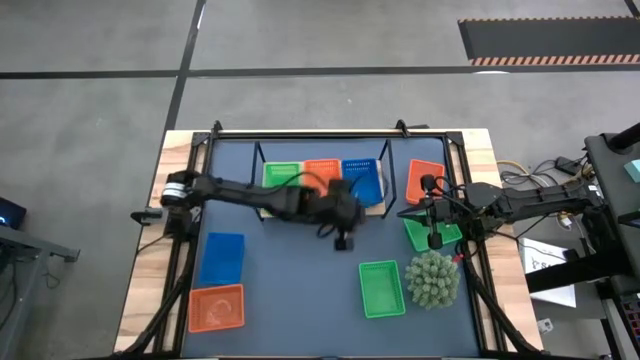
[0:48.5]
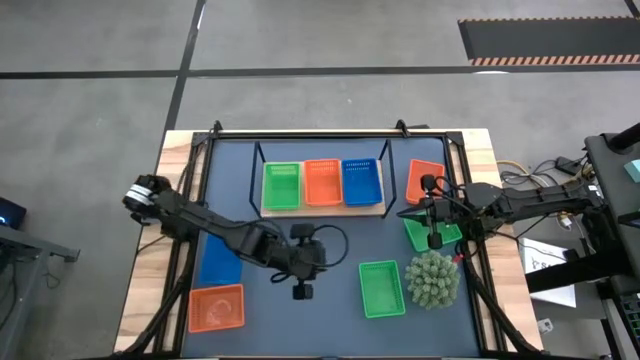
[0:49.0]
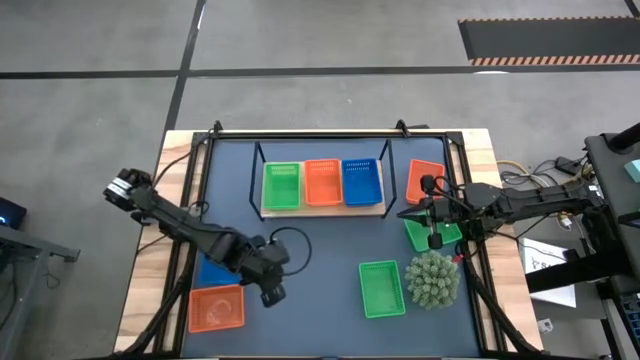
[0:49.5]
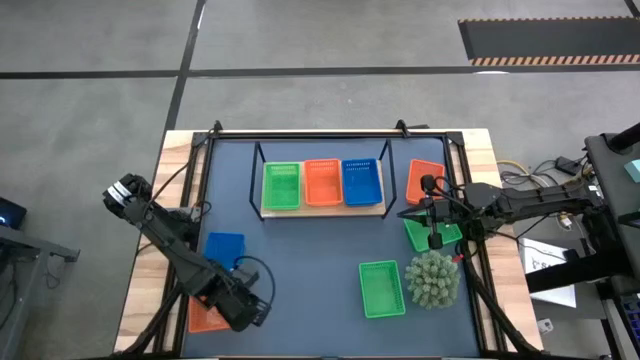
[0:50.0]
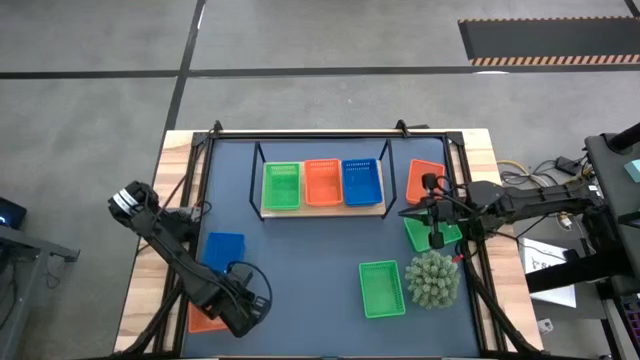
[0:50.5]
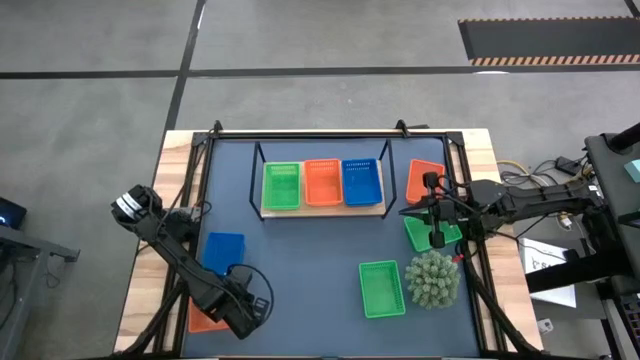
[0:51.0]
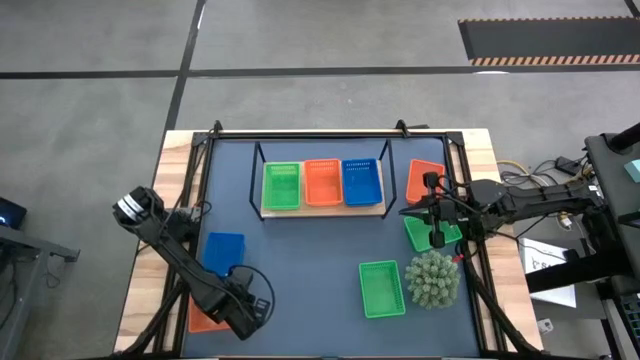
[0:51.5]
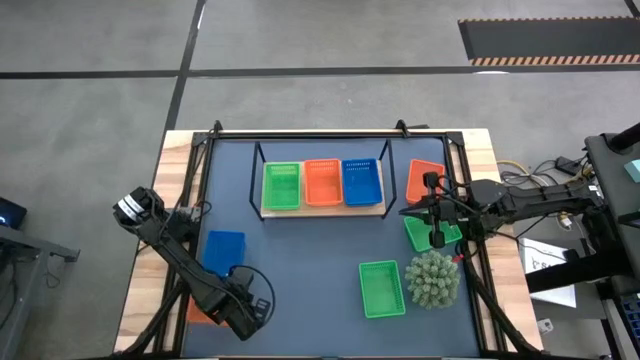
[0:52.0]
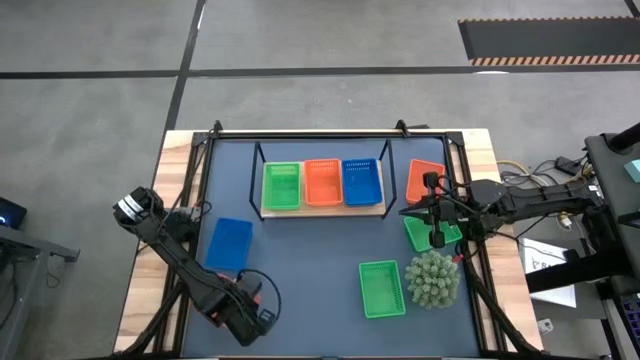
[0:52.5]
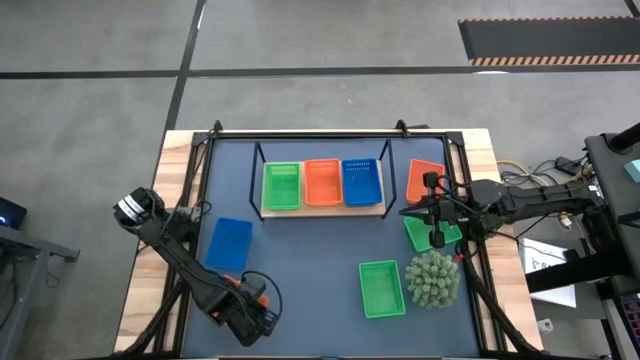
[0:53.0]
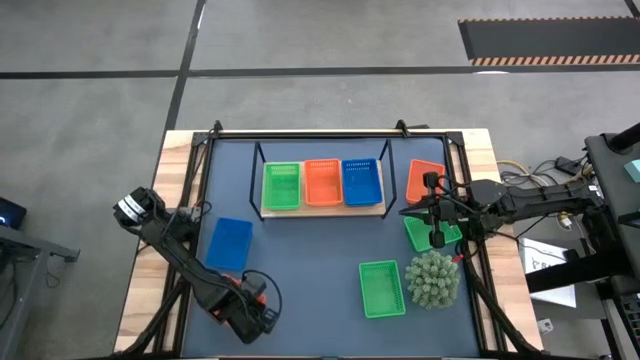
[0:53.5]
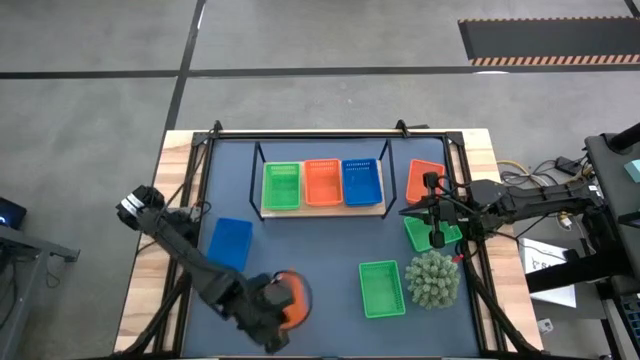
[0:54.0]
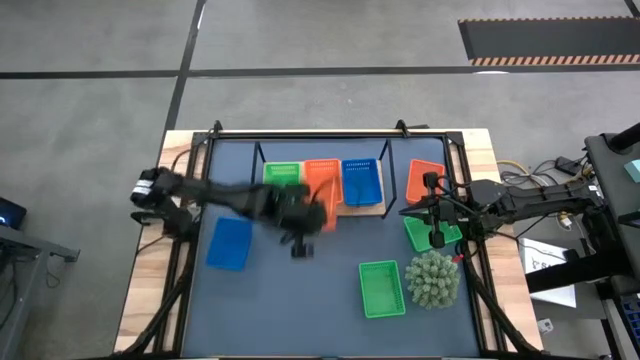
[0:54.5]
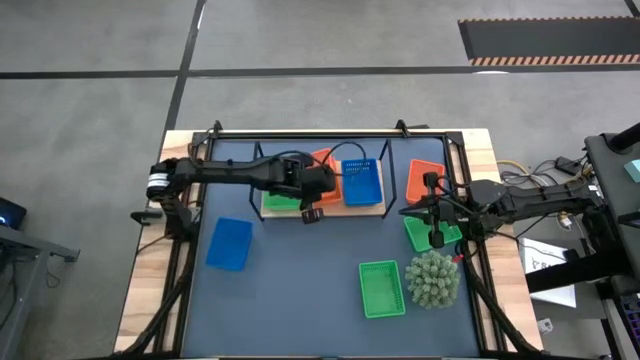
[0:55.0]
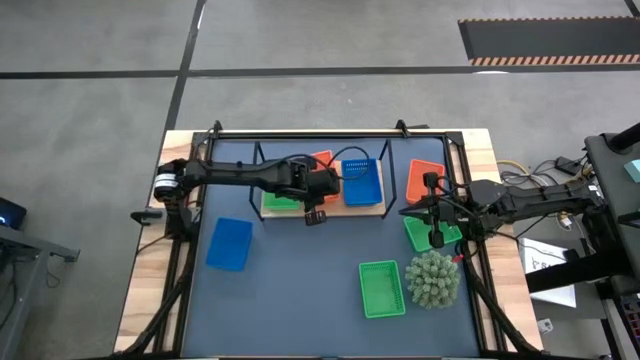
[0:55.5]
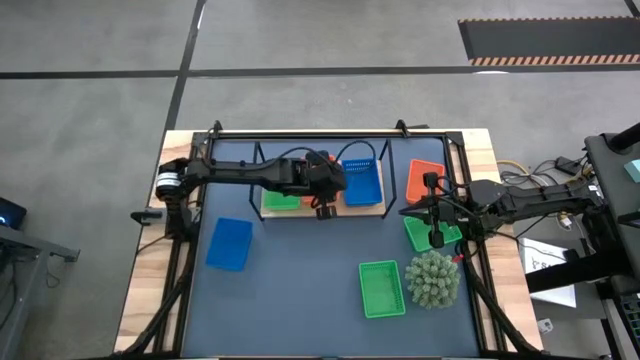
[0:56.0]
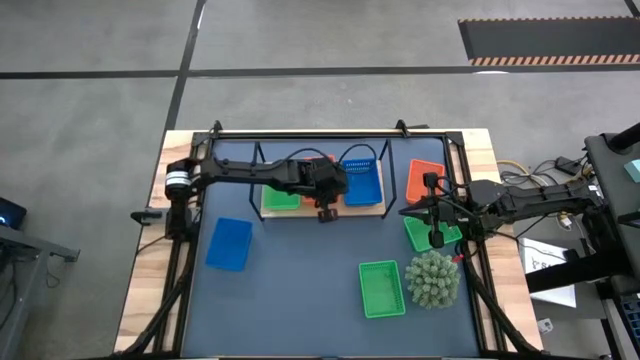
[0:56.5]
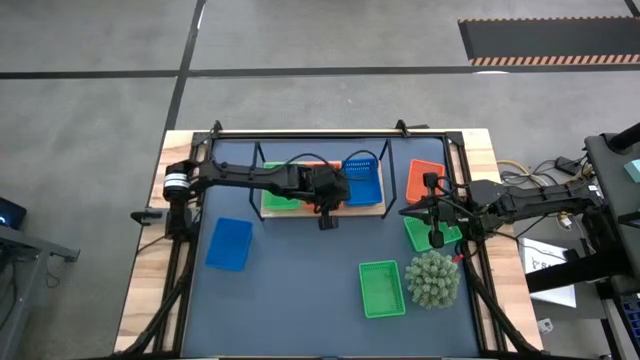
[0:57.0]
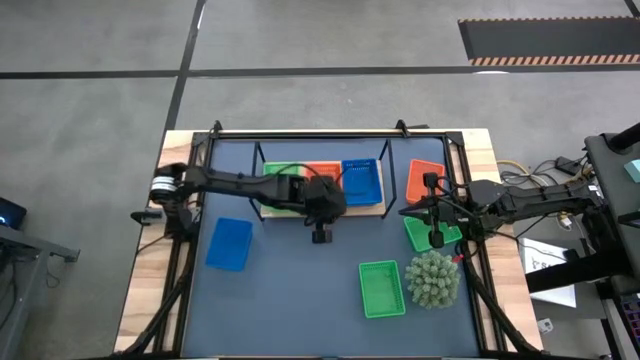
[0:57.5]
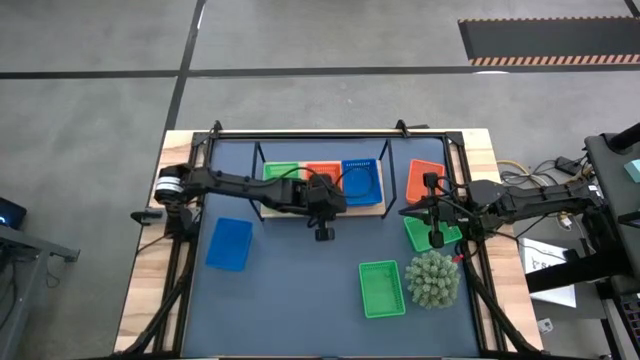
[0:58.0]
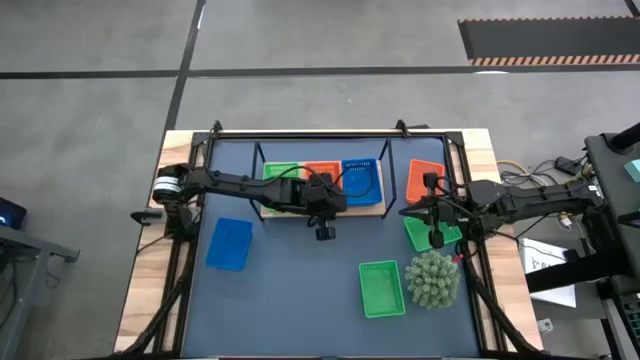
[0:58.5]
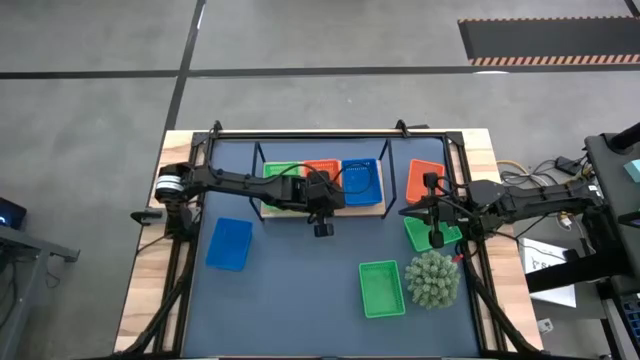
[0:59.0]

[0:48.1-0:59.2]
Task: Stack baskets on shelf by color
Stack the bottom orange basket on top of the orange basket on the shelf

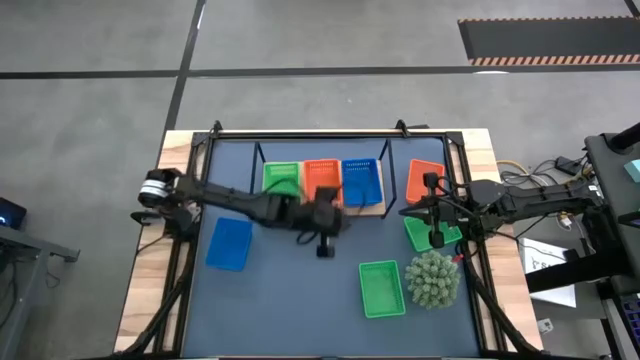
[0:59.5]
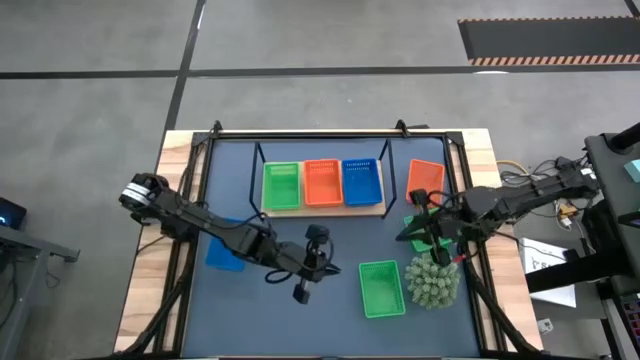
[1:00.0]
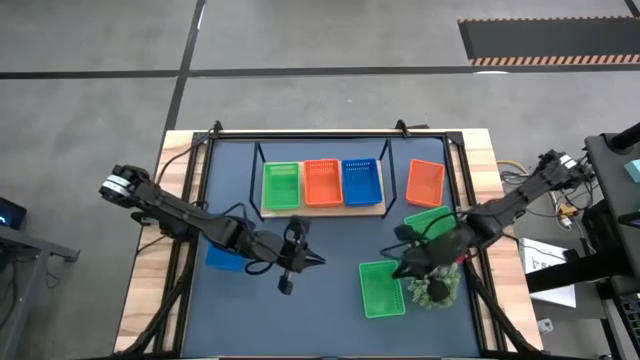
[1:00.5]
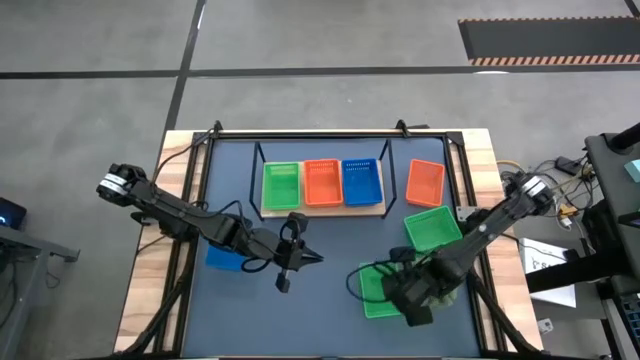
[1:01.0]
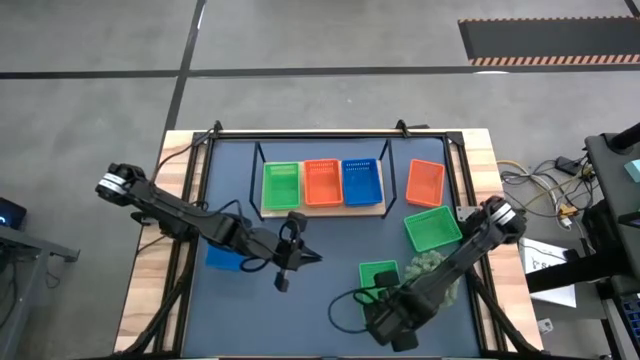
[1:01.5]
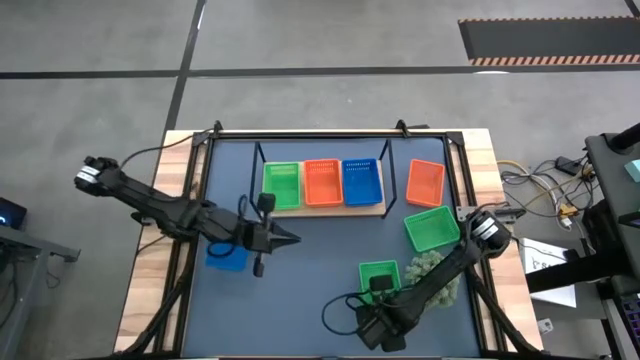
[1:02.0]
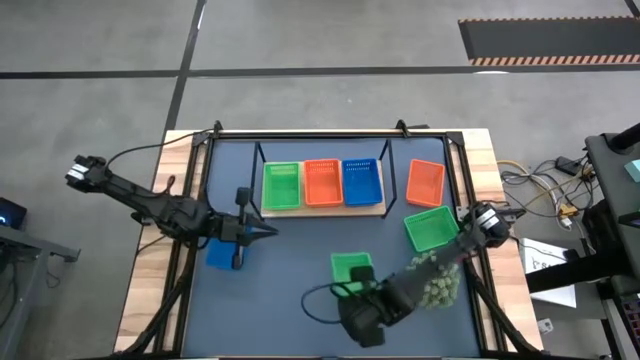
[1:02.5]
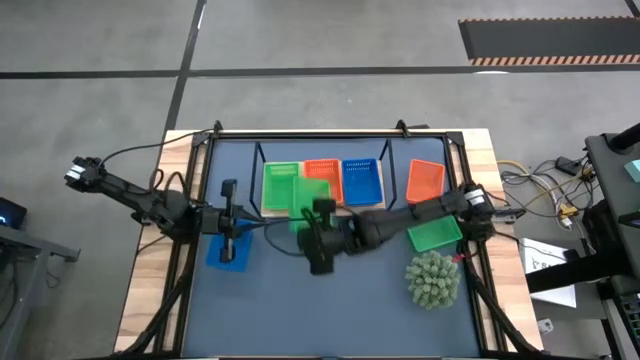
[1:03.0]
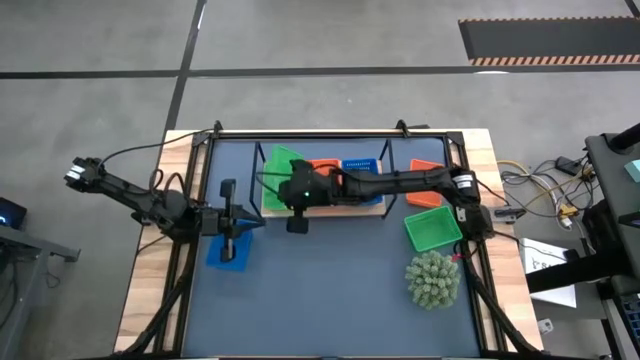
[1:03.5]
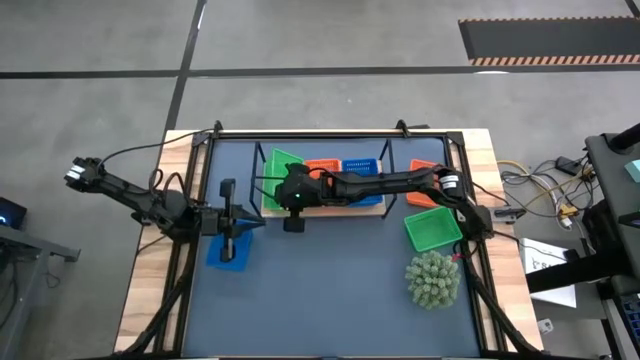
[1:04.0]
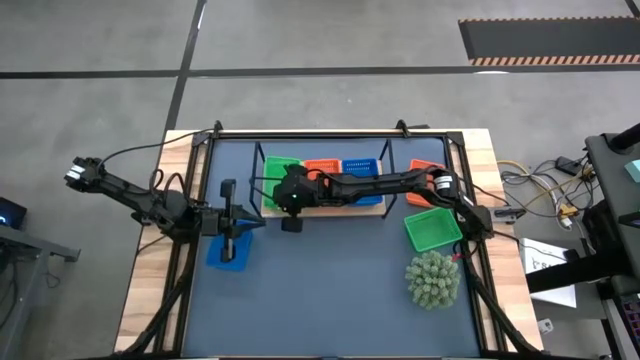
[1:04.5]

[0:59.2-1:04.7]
Stack the bottom green basket on the green basket on the shelf
